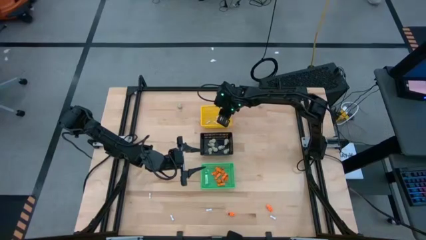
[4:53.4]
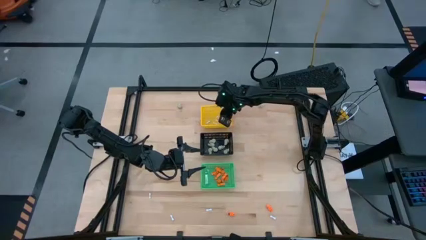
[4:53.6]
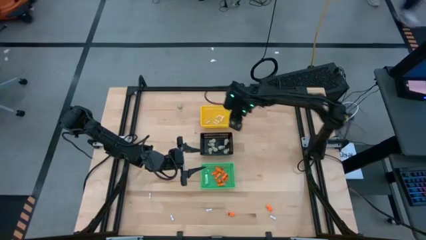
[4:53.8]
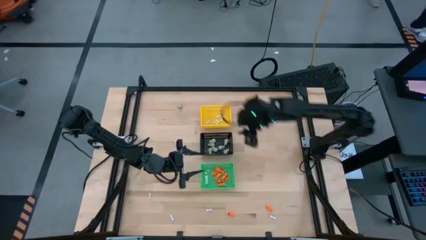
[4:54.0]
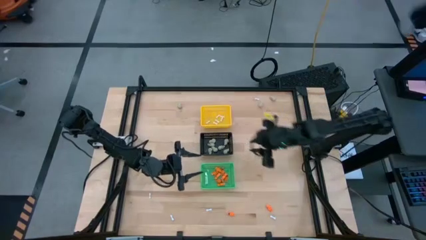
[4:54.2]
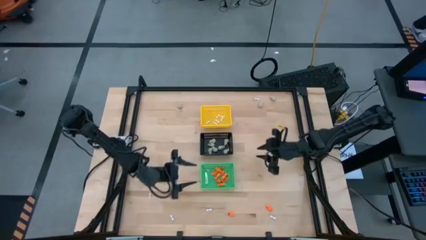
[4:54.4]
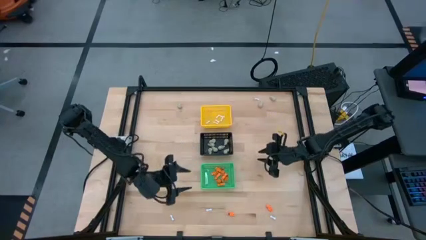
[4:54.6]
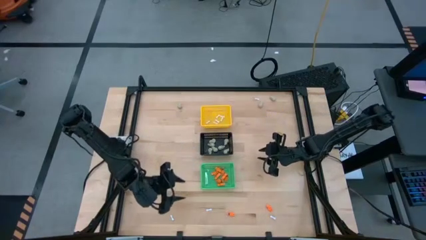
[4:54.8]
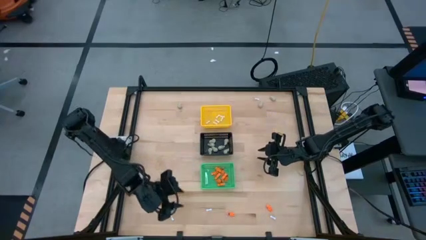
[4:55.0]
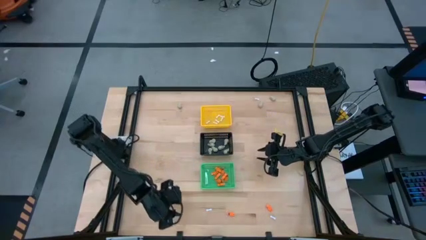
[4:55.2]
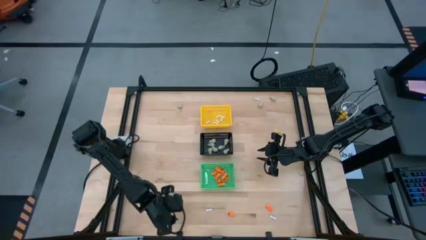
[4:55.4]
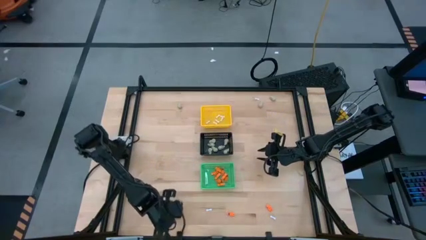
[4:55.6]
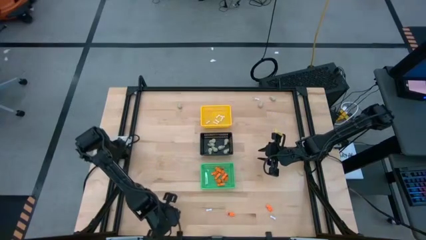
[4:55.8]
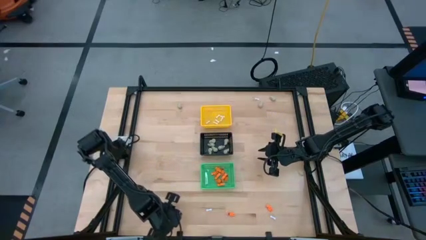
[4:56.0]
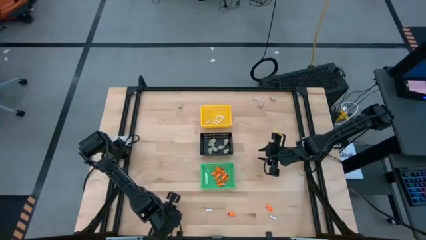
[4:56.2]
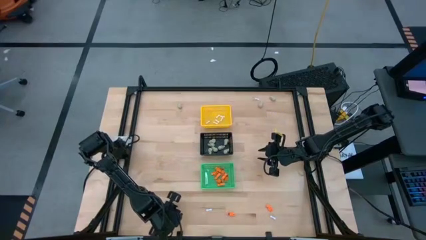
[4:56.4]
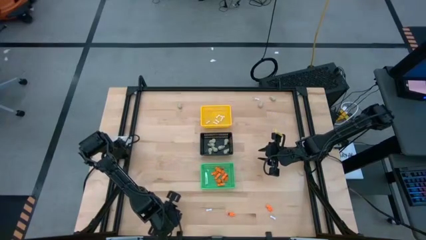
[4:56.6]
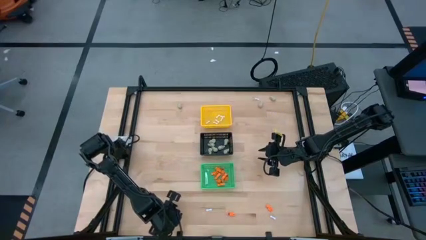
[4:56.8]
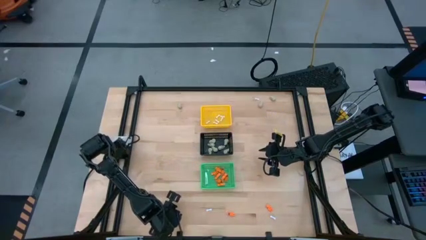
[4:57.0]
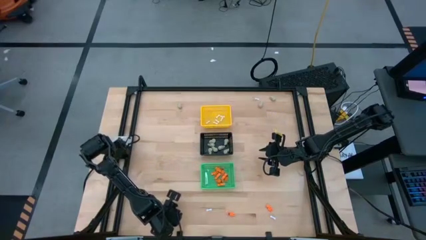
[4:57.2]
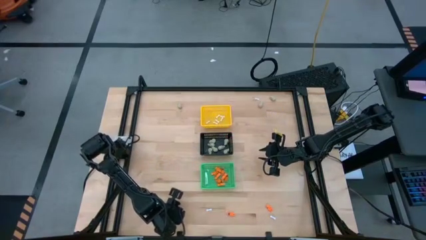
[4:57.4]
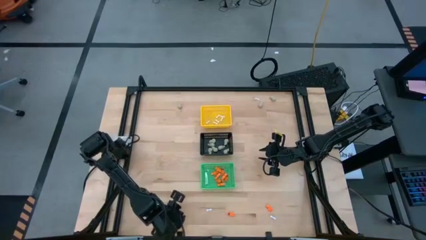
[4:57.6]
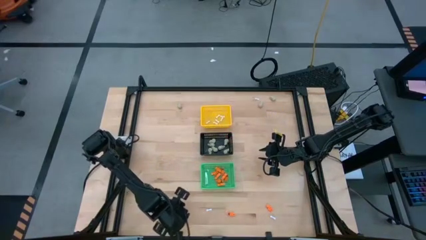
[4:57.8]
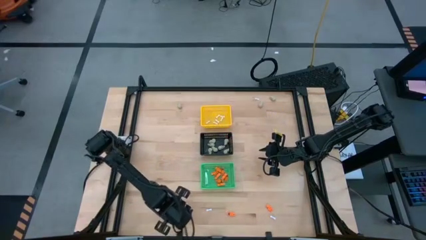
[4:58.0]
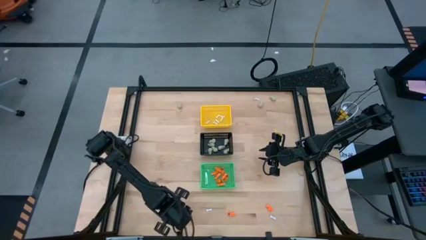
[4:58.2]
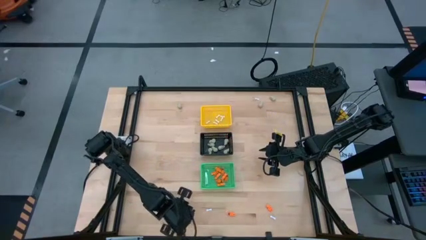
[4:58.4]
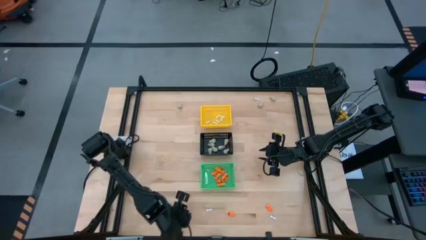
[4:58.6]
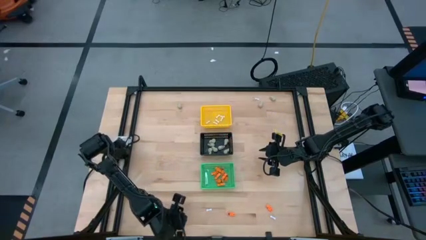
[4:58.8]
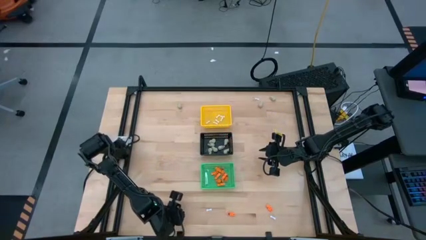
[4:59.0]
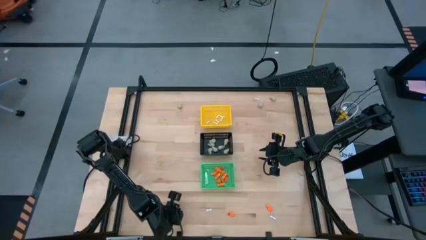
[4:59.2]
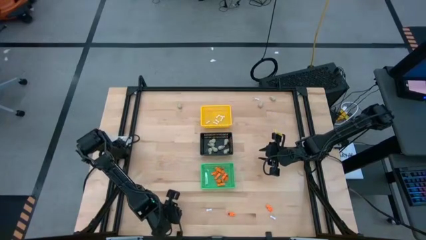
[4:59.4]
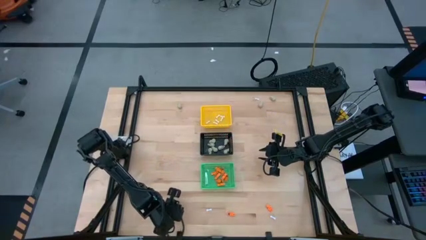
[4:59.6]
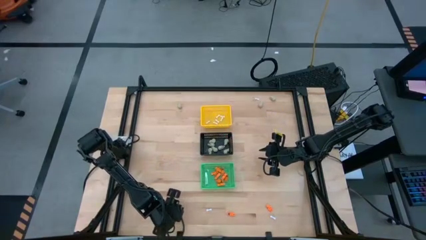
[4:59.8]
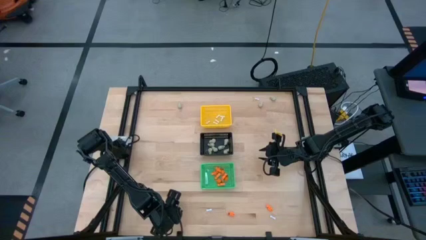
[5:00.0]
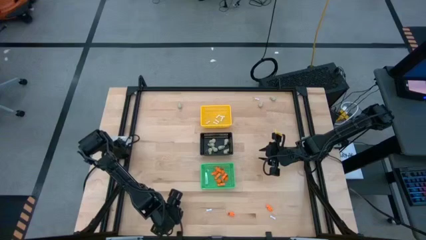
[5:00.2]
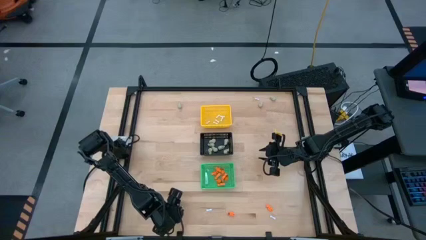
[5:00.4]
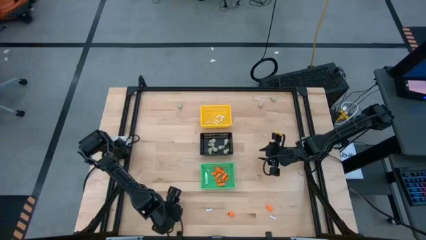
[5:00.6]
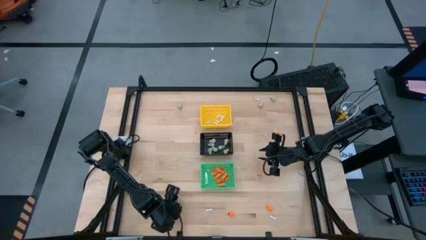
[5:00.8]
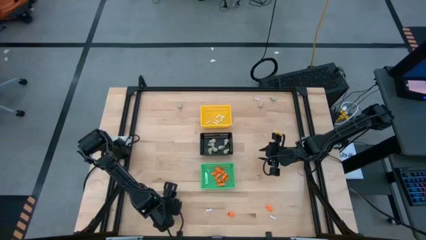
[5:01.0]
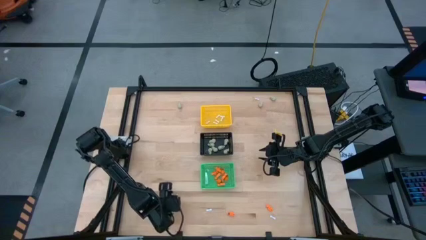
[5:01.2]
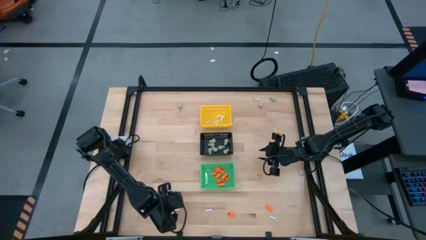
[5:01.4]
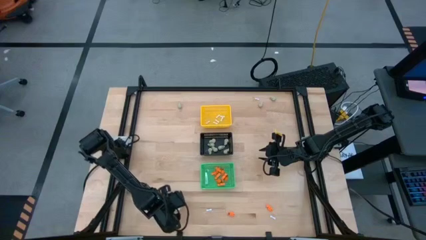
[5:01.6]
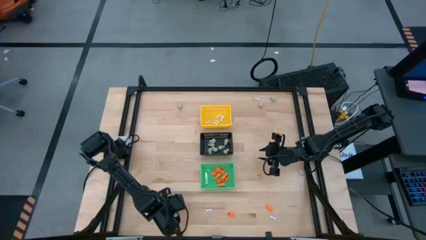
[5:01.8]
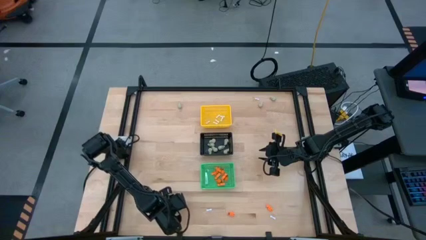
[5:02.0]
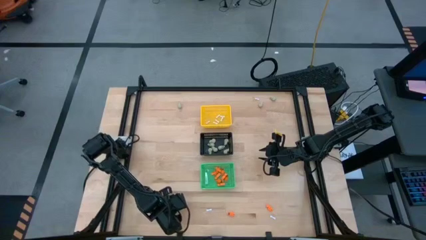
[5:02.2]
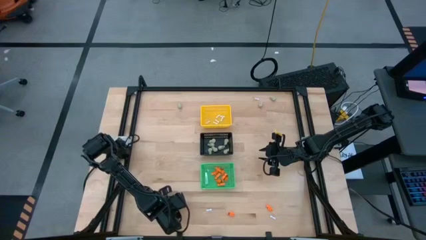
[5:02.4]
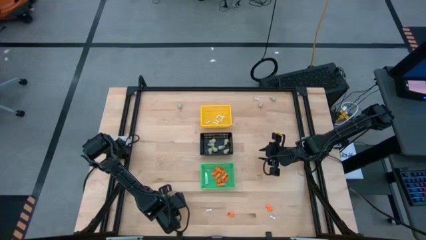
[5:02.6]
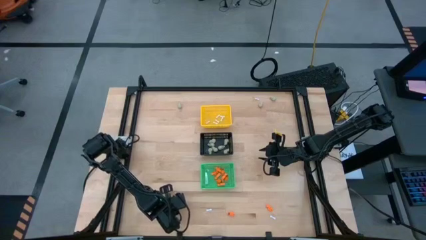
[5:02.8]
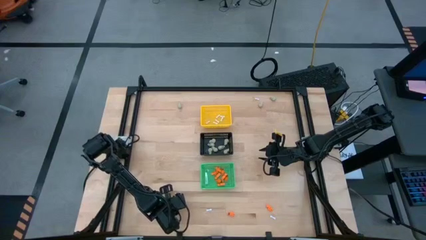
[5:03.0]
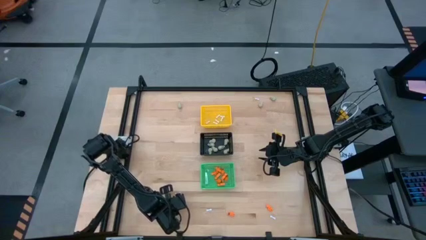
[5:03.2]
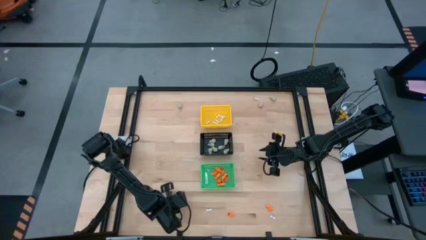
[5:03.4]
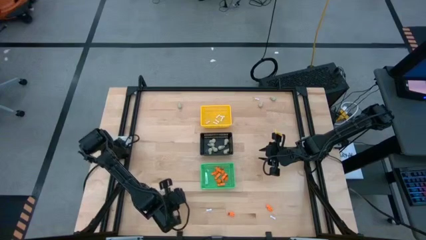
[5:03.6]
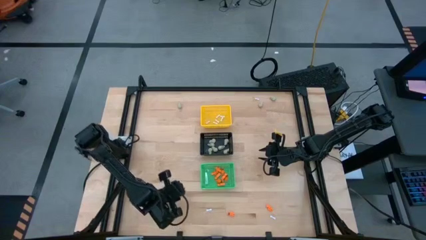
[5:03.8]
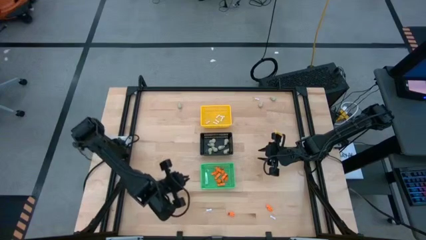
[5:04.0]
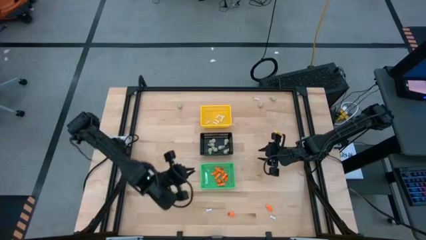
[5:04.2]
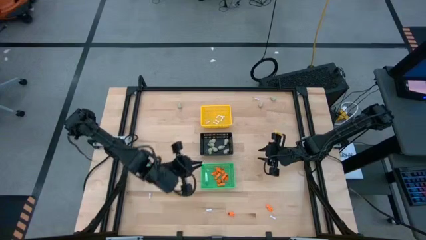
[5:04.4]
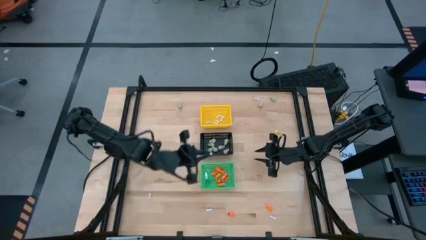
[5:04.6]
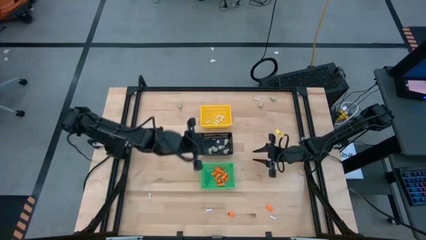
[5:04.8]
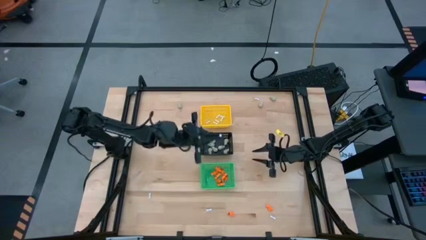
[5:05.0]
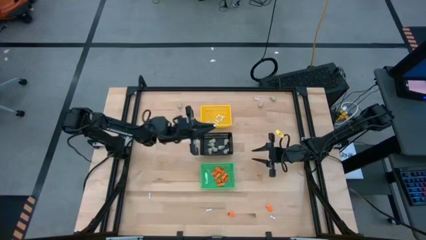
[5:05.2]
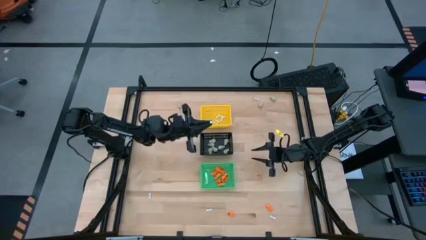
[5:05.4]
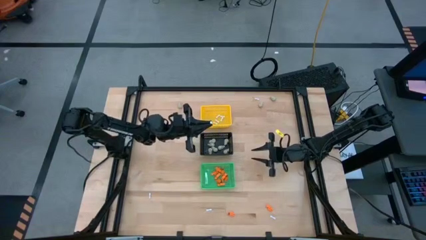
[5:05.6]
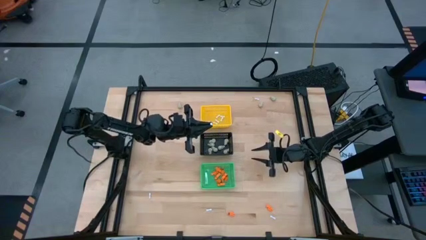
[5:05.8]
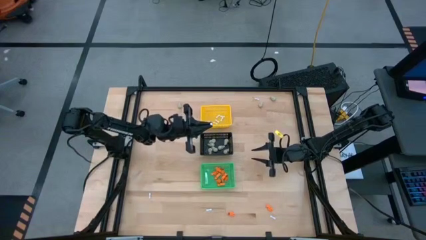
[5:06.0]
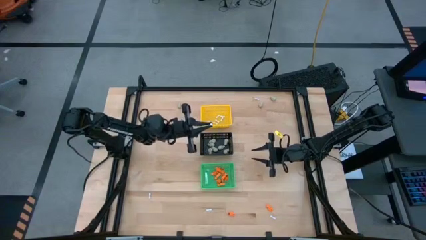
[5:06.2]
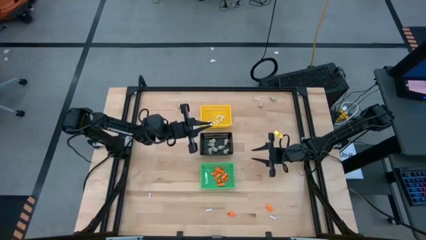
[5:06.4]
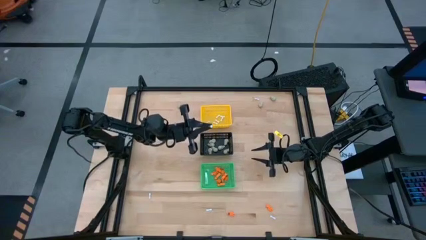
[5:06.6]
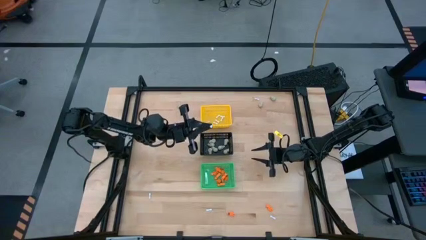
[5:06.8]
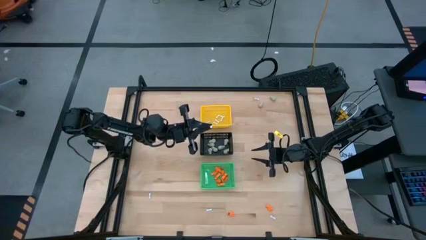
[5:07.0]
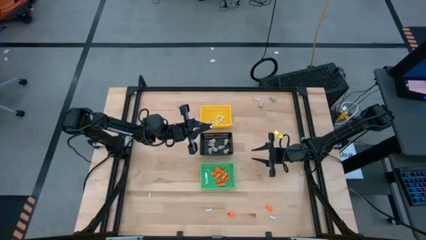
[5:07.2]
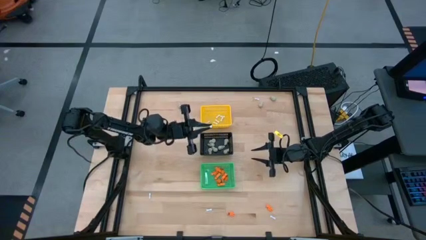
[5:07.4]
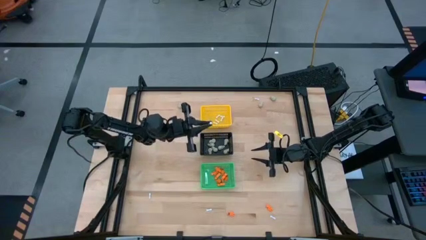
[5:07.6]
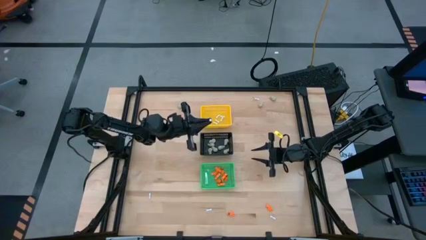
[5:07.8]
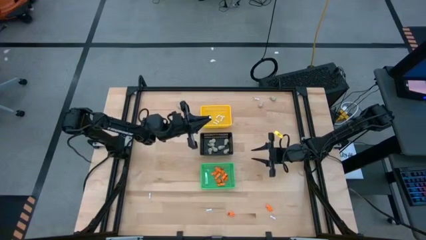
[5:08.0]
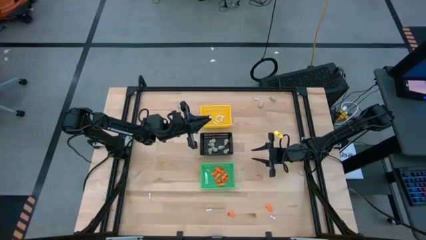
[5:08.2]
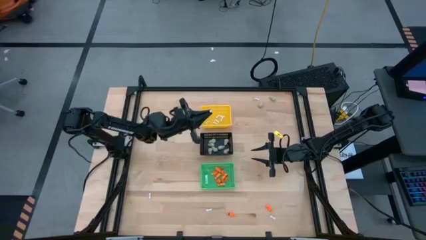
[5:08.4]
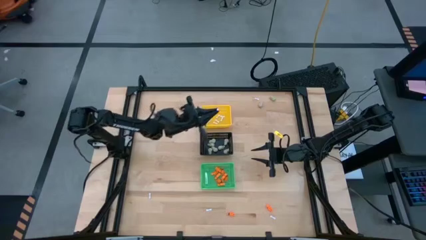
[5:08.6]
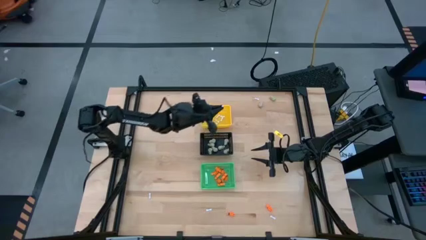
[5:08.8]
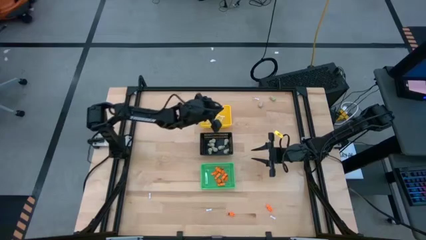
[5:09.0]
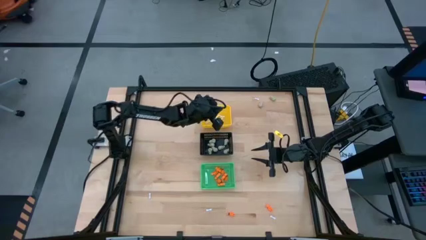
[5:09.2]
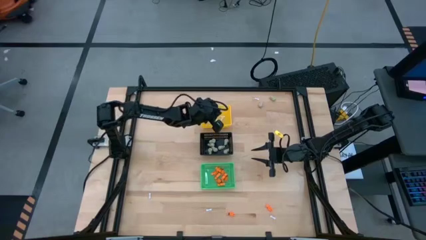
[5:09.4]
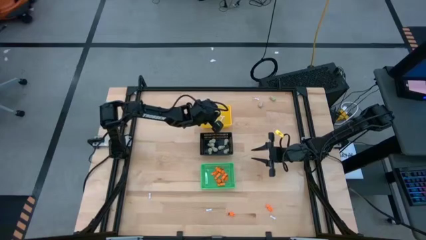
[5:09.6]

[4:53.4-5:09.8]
Task: Sort Halloween decoration
Put the white bone toy into the yellow basket
